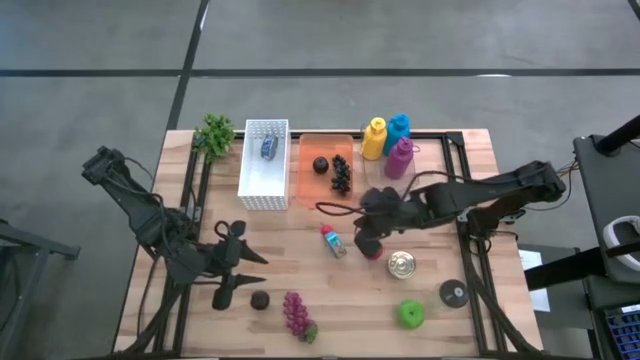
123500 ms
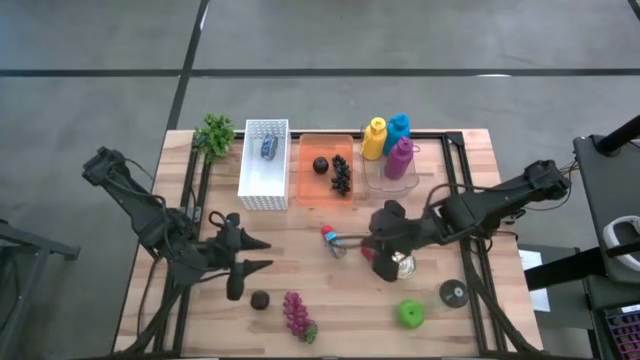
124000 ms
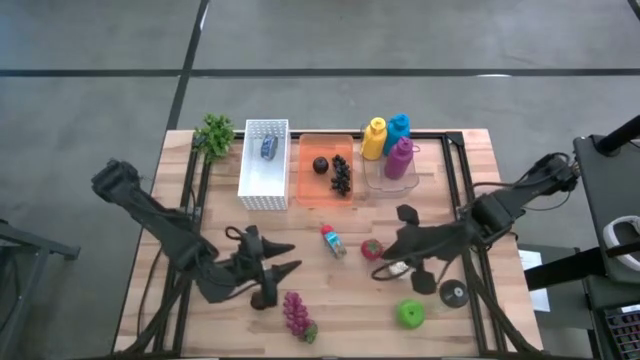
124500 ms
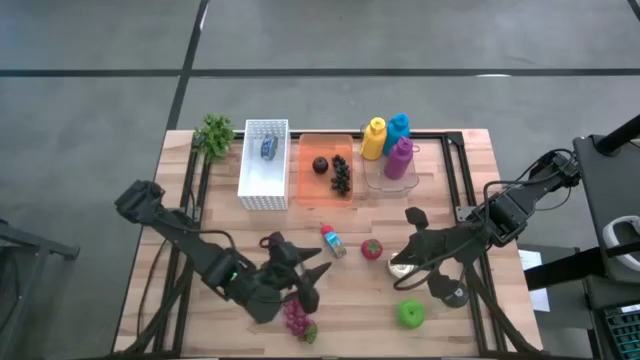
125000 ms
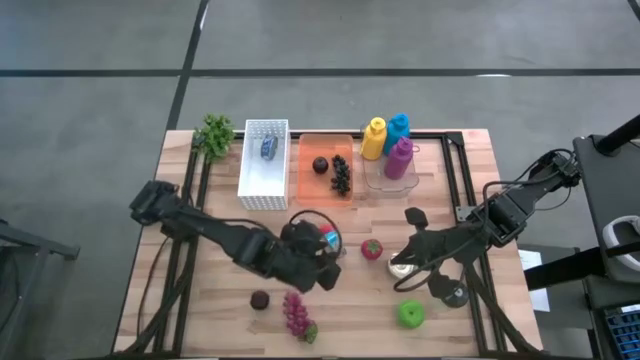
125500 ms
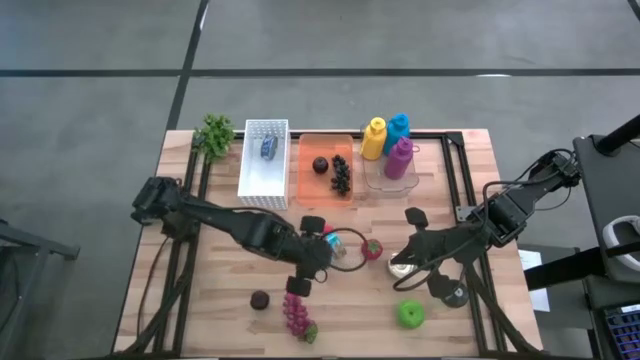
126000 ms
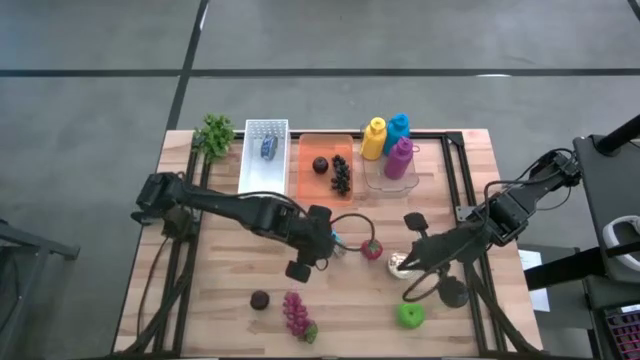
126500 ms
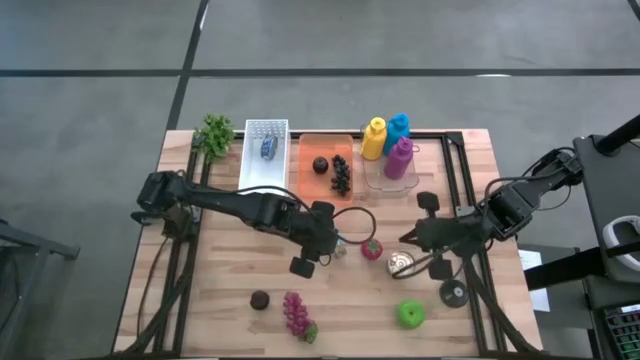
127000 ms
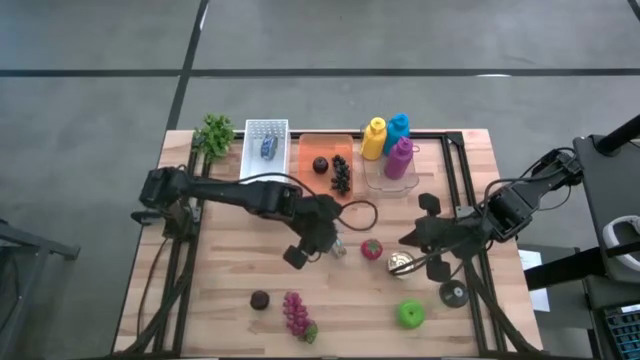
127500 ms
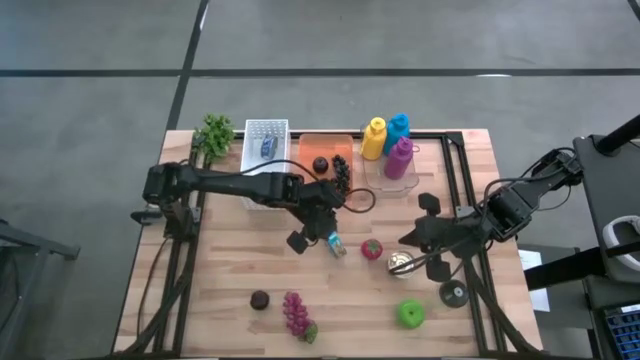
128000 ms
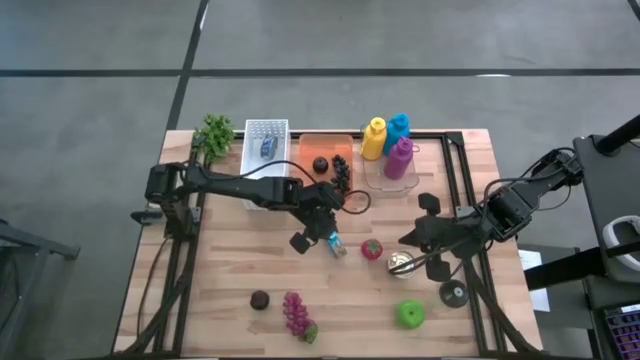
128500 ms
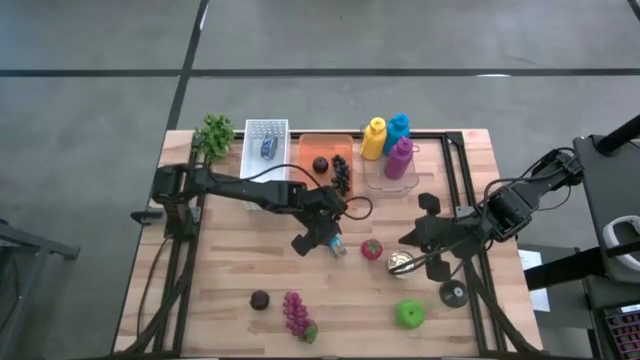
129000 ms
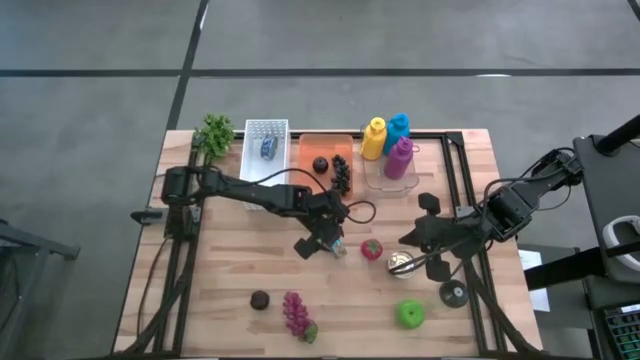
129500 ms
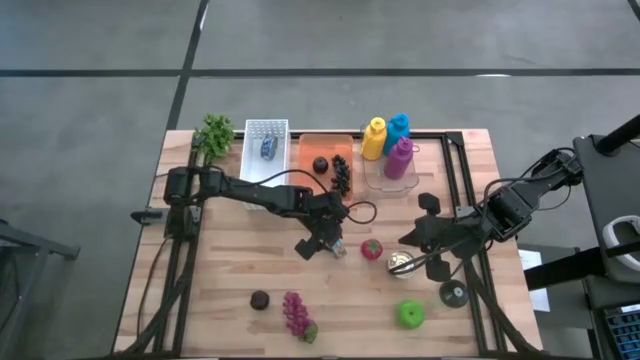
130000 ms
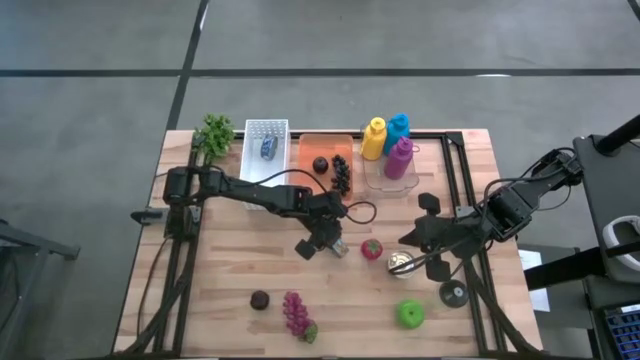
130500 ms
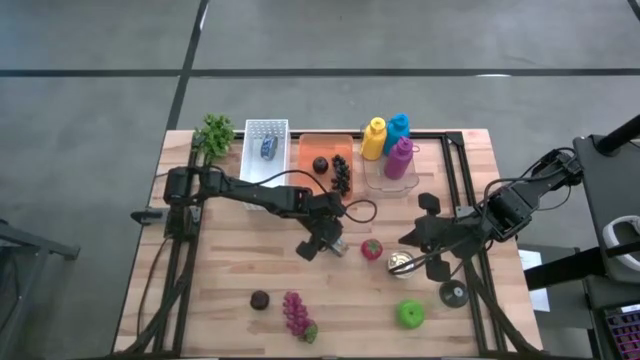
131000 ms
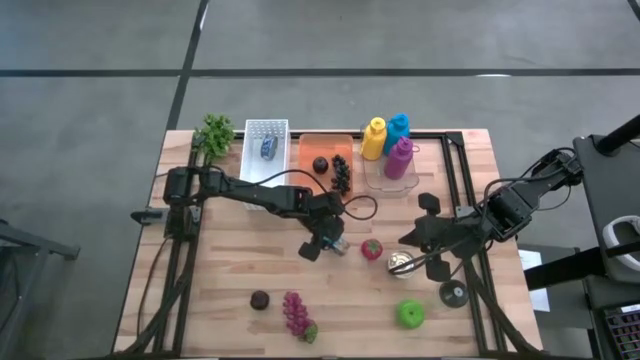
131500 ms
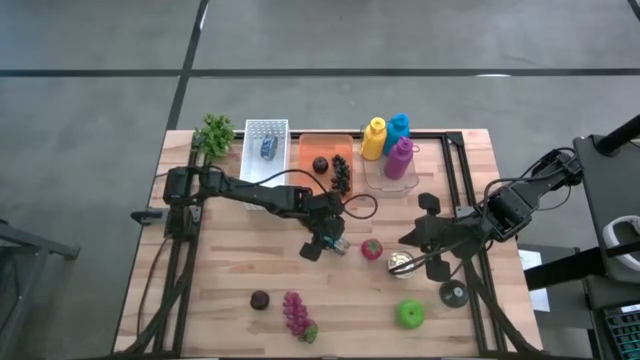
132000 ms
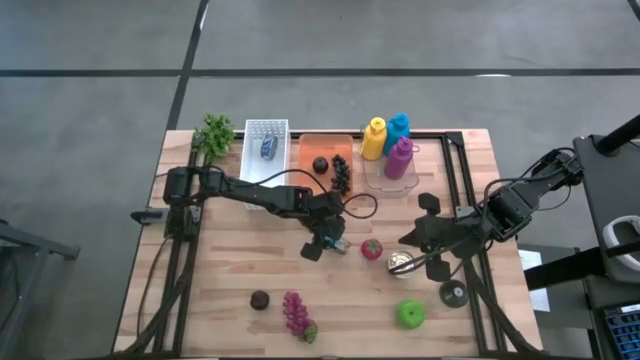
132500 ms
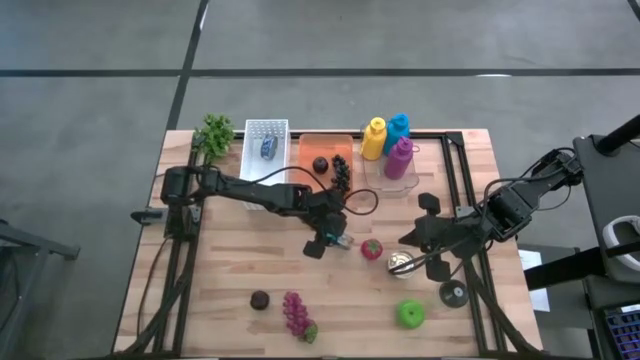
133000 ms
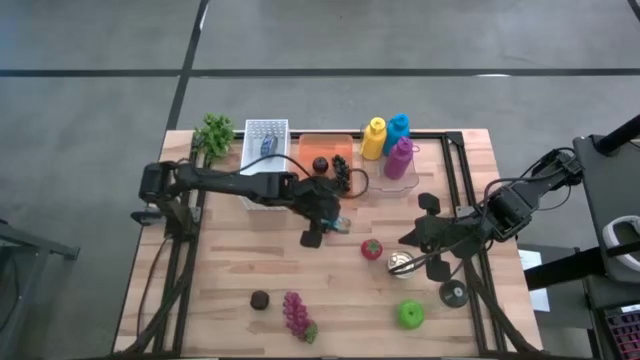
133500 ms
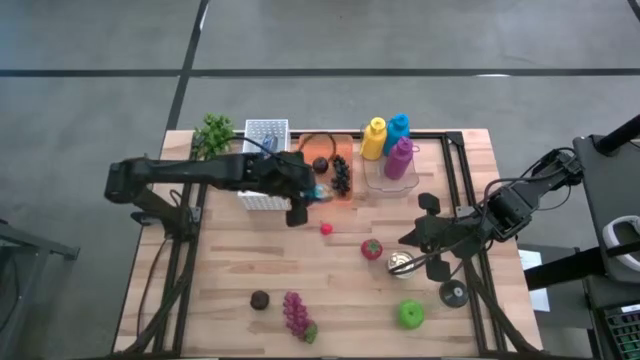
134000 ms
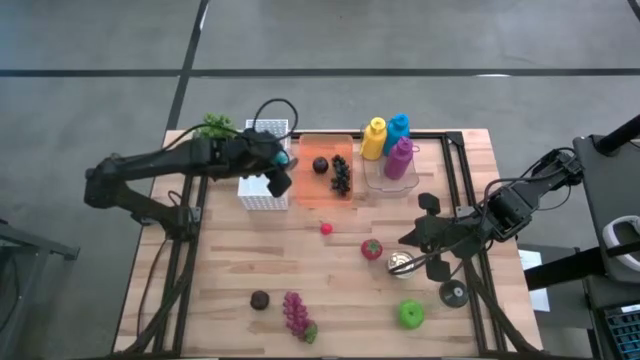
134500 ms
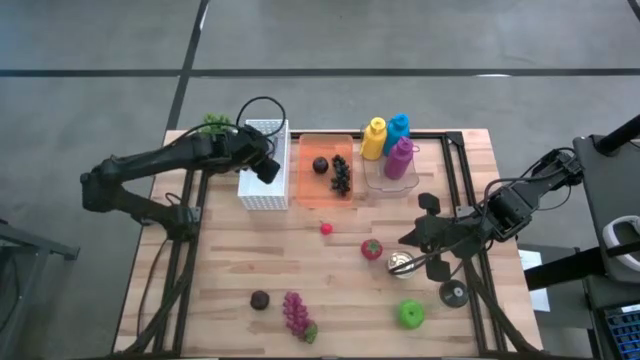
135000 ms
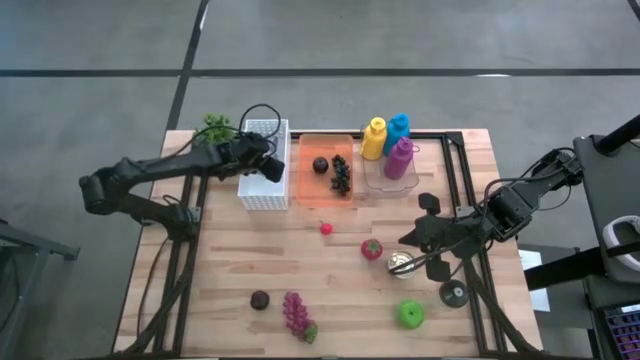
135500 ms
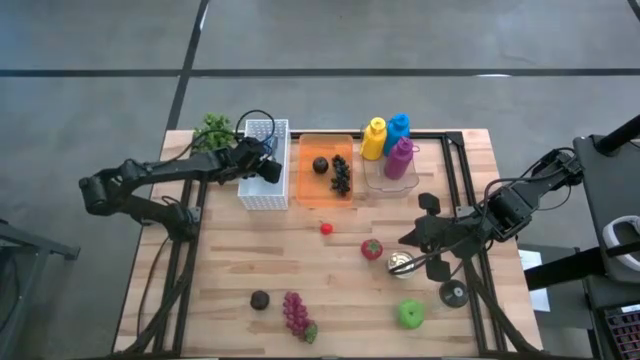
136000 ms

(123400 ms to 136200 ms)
Task: Pick & Place Food Item
Put the bottom blue tuna can into the white bin

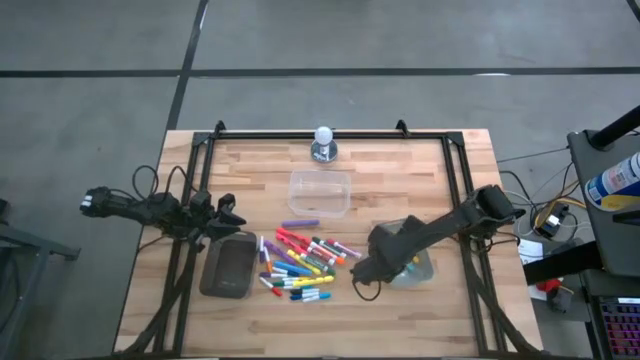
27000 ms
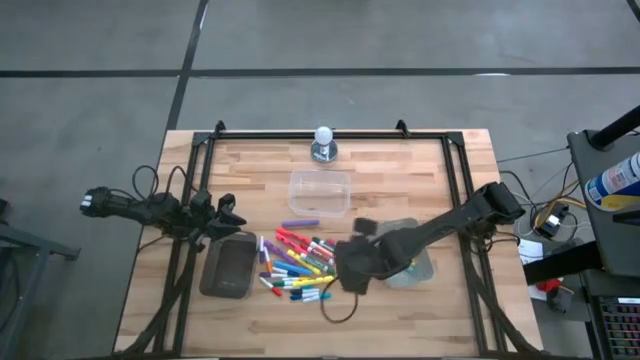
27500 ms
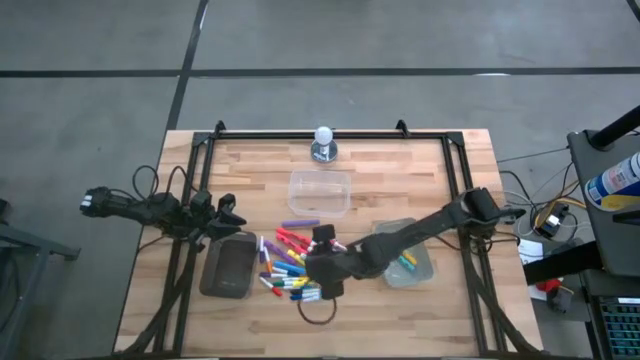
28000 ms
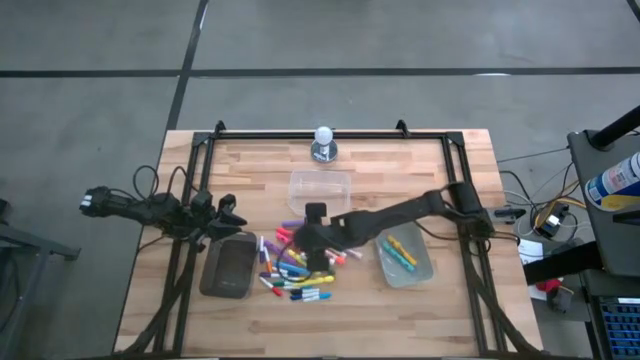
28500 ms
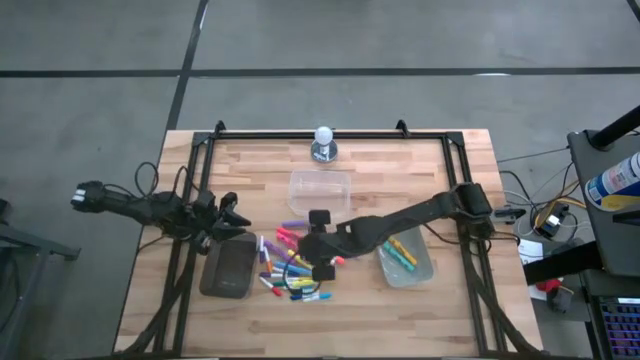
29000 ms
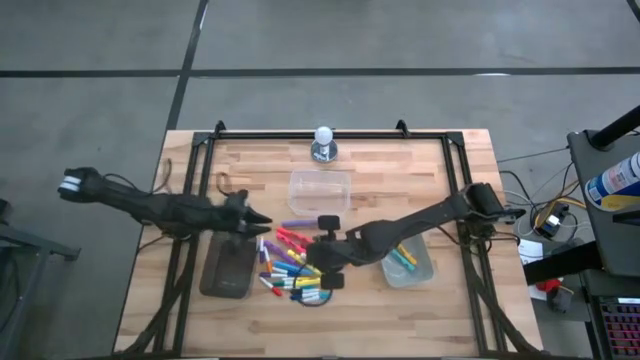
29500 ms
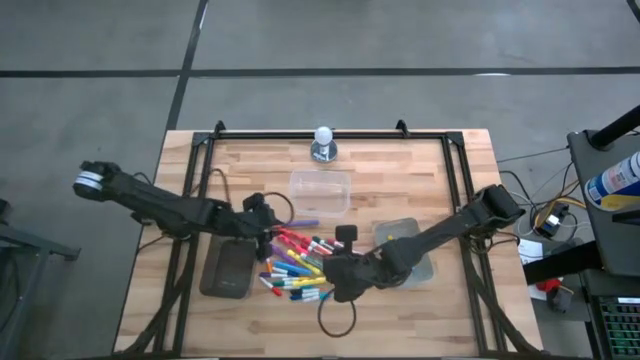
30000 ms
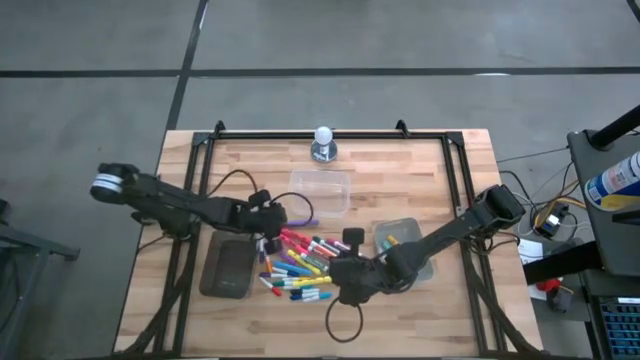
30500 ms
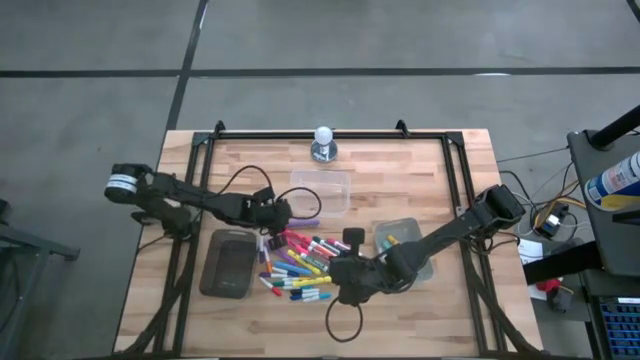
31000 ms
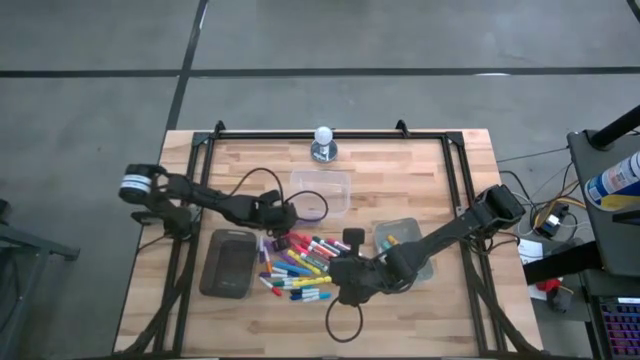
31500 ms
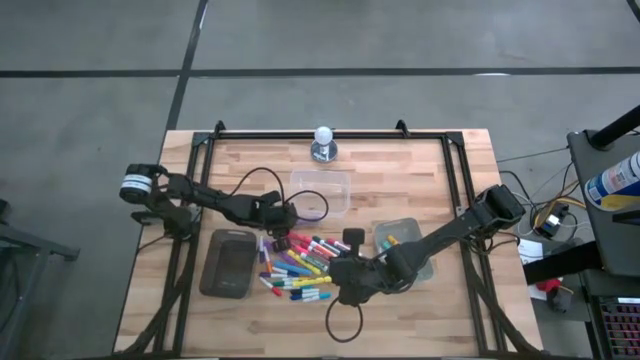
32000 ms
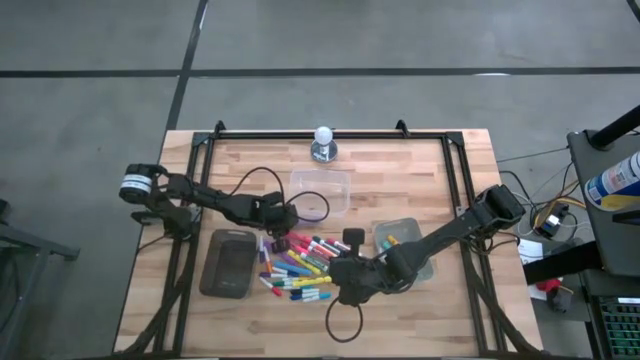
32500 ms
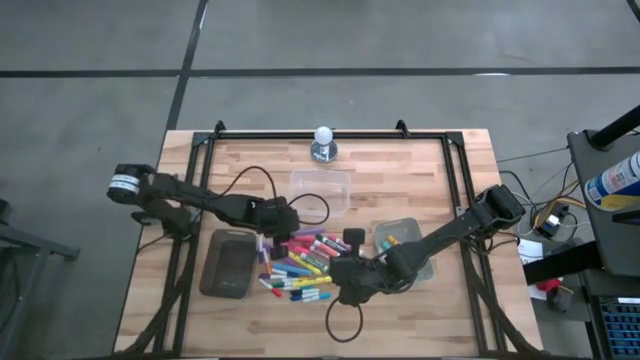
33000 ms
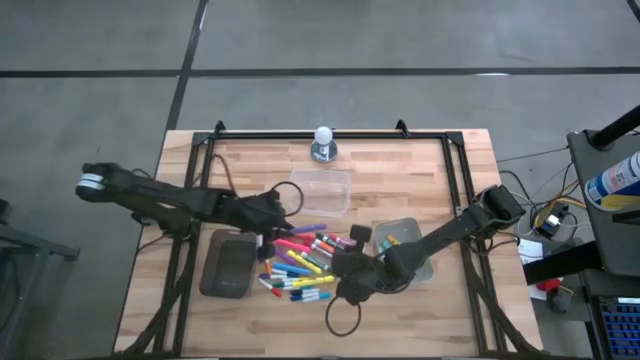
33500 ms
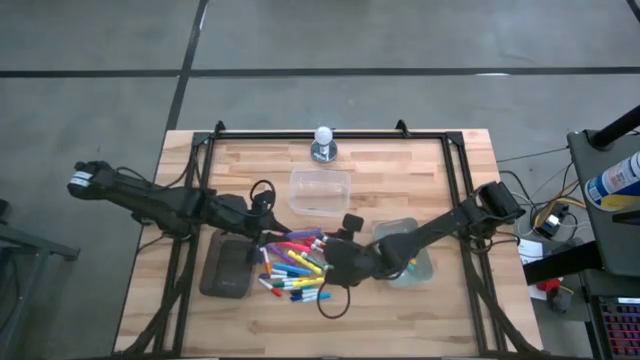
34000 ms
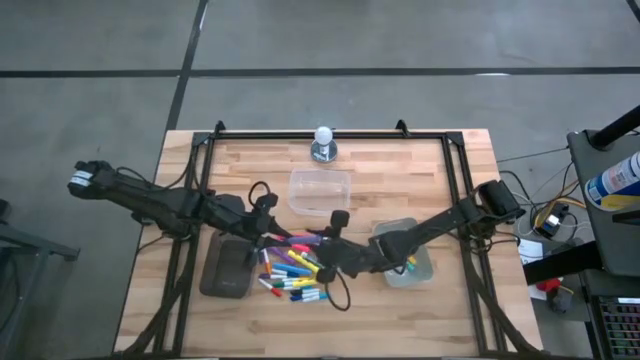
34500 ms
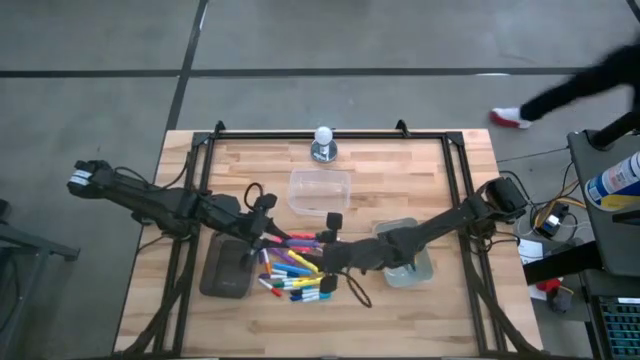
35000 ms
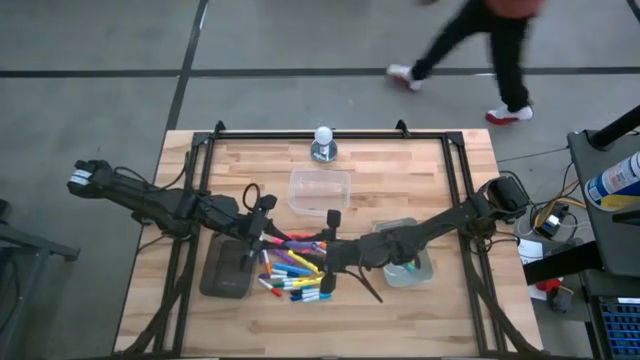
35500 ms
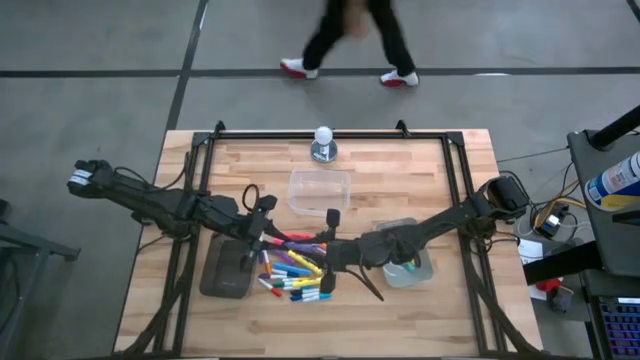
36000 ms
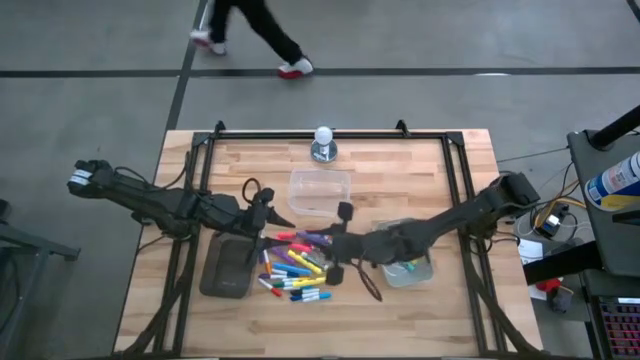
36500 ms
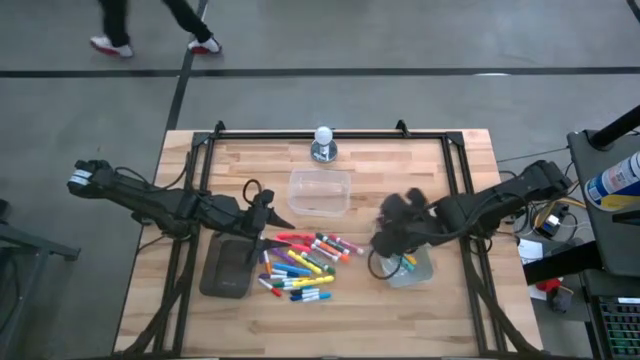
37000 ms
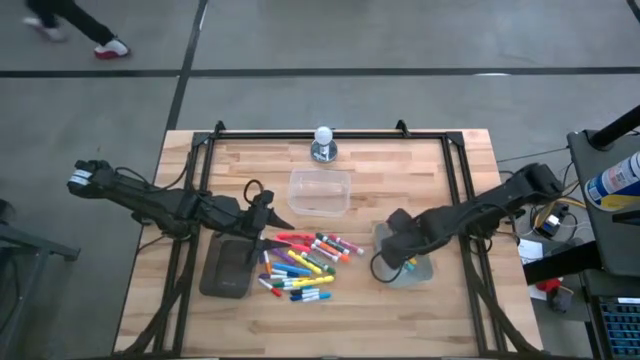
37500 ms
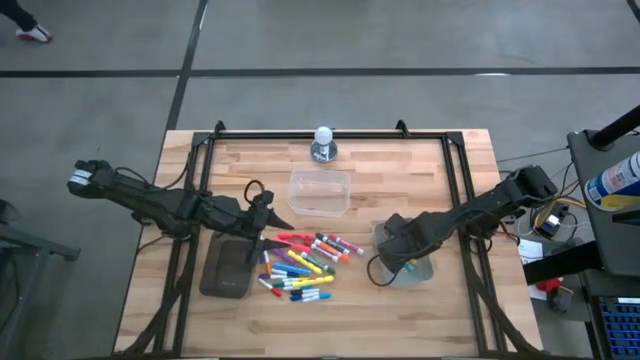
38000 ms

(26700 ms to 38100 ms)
Task: Pick & Place Markers
Put the light purple highlighter into the gray bin
